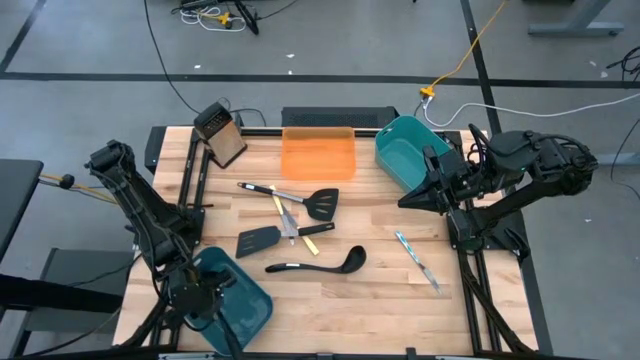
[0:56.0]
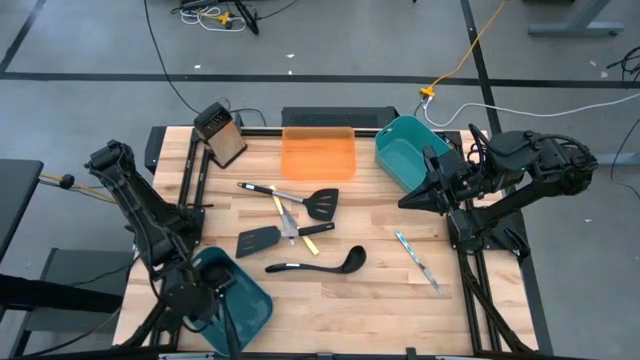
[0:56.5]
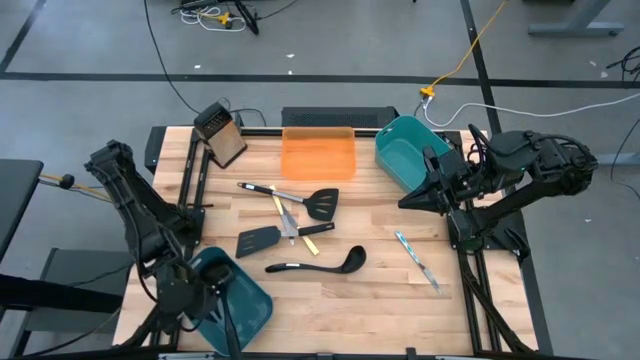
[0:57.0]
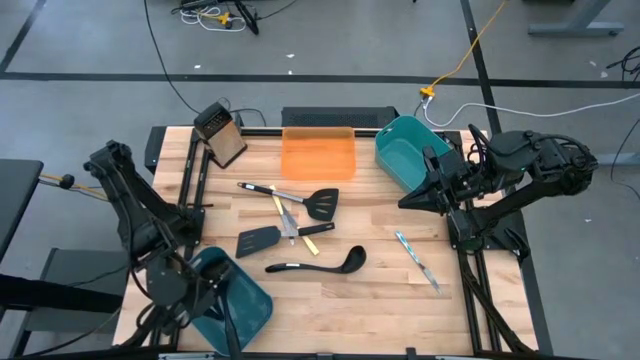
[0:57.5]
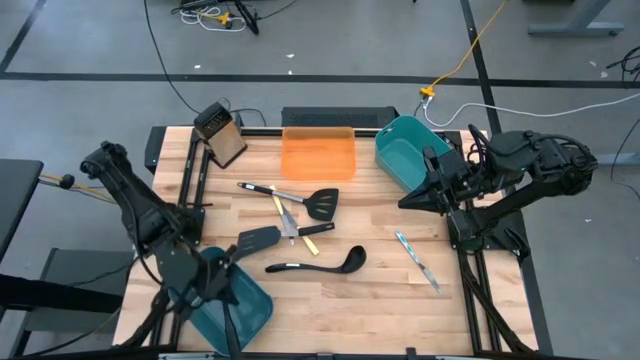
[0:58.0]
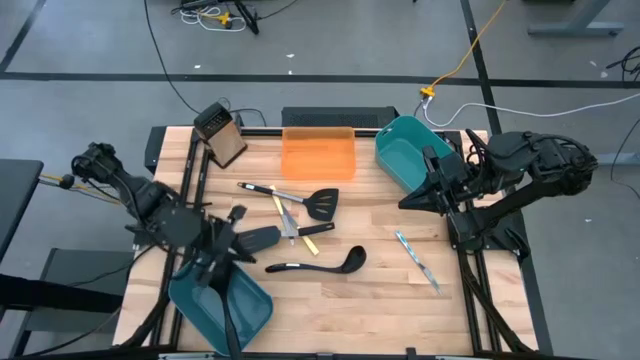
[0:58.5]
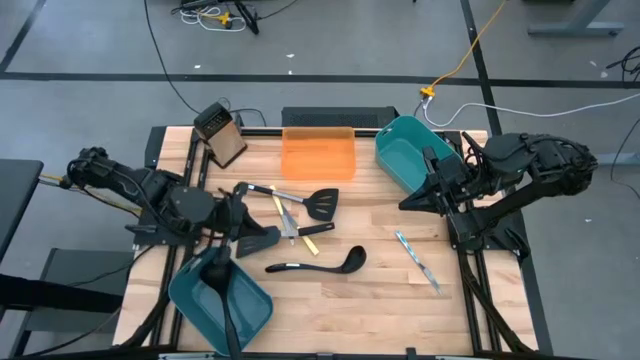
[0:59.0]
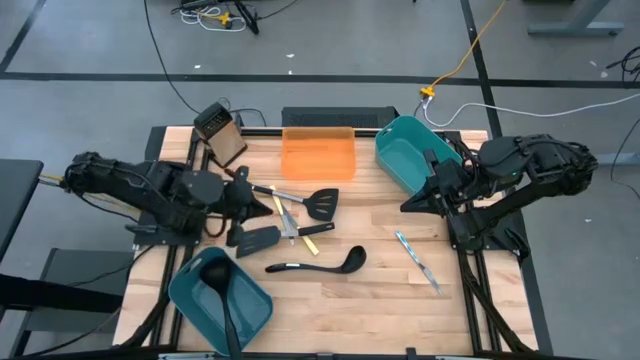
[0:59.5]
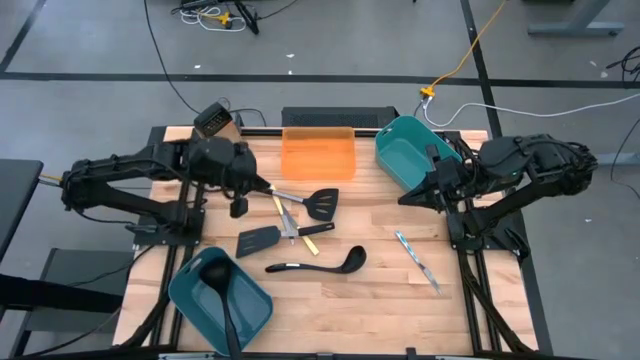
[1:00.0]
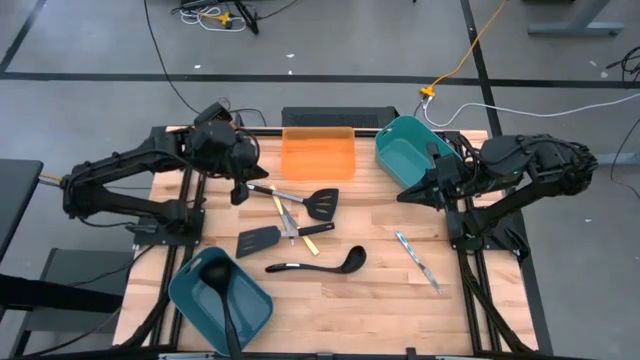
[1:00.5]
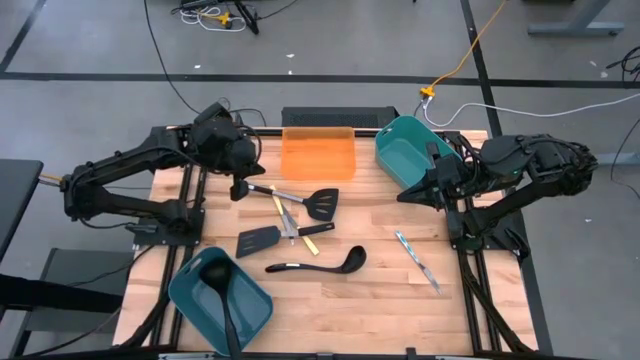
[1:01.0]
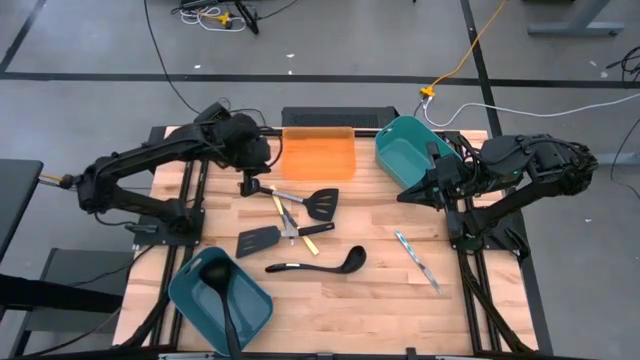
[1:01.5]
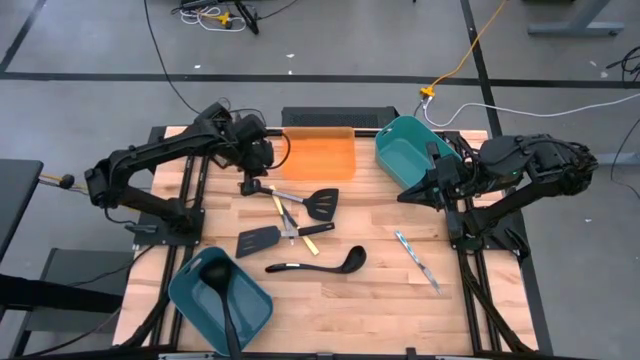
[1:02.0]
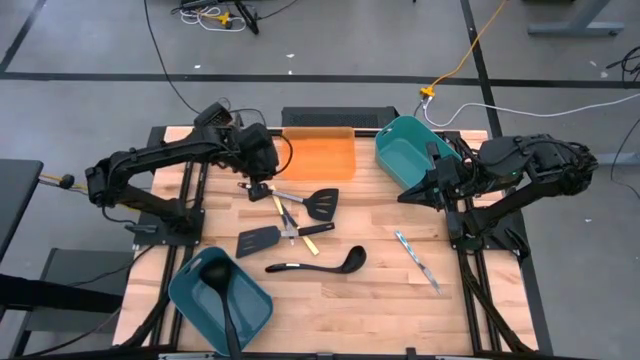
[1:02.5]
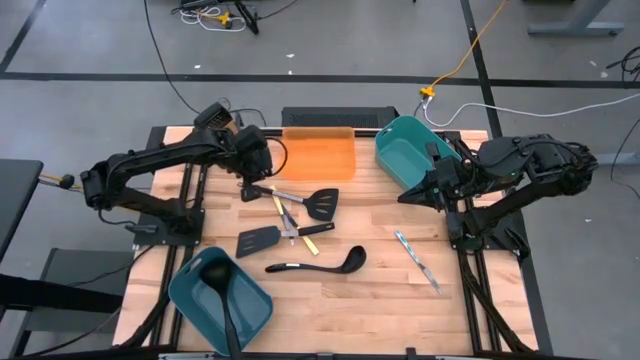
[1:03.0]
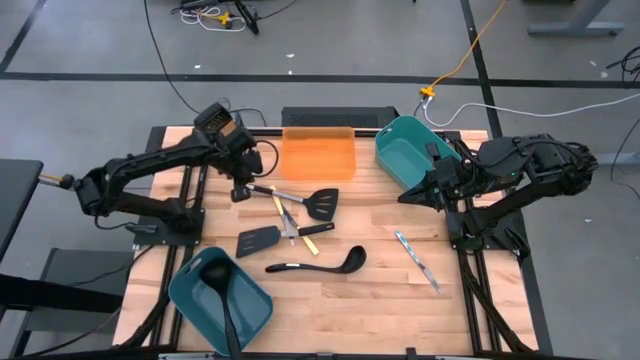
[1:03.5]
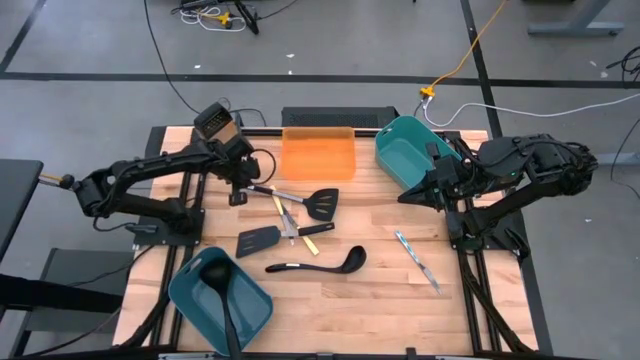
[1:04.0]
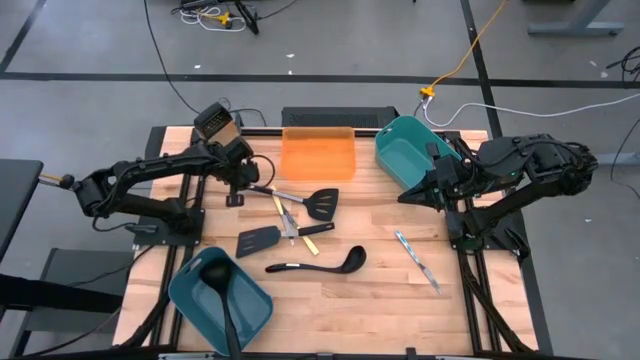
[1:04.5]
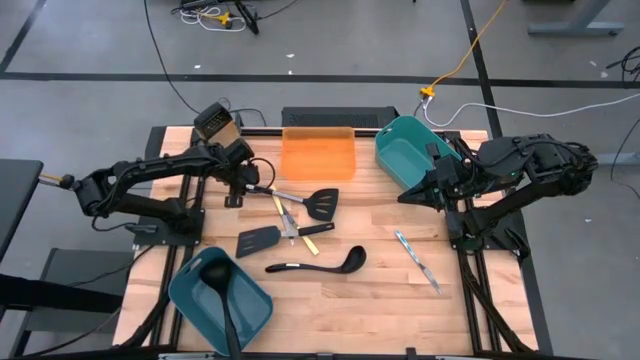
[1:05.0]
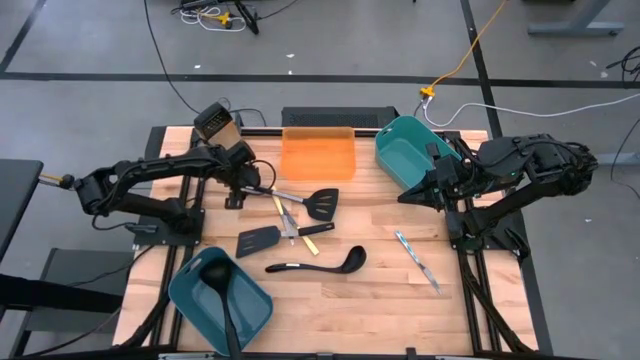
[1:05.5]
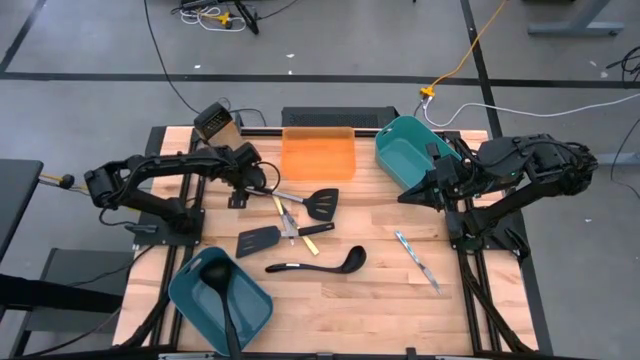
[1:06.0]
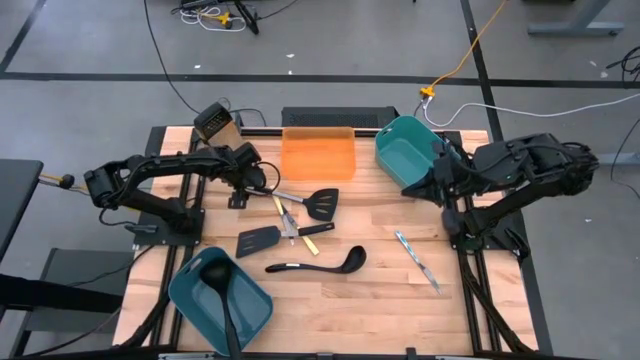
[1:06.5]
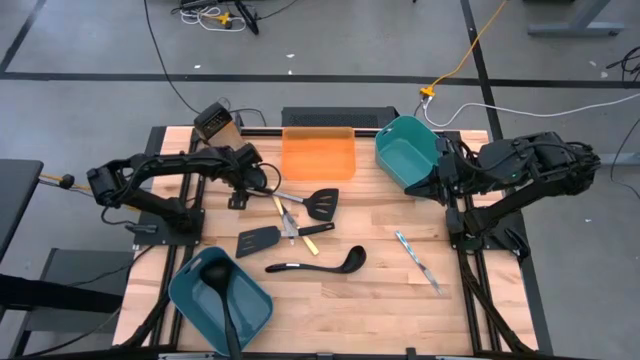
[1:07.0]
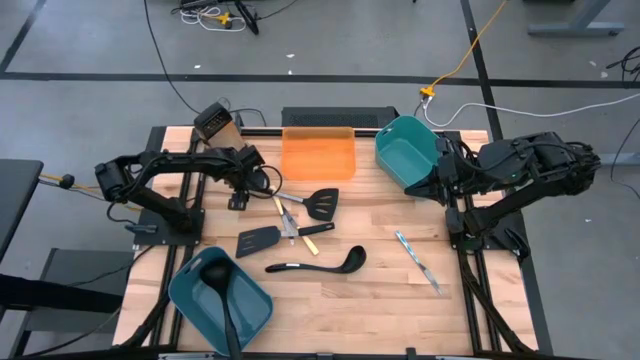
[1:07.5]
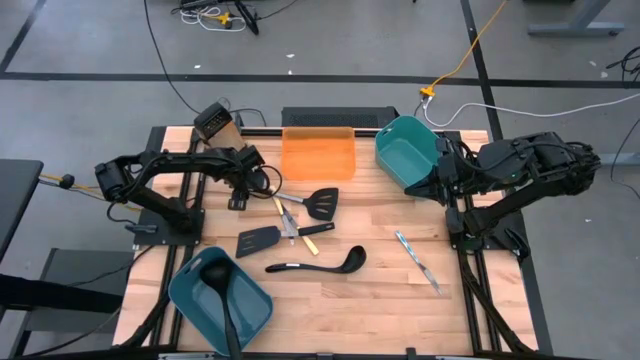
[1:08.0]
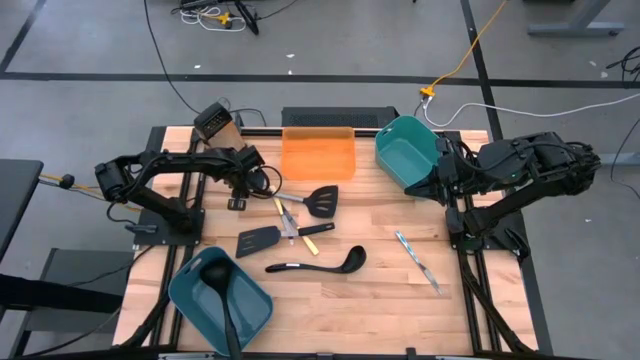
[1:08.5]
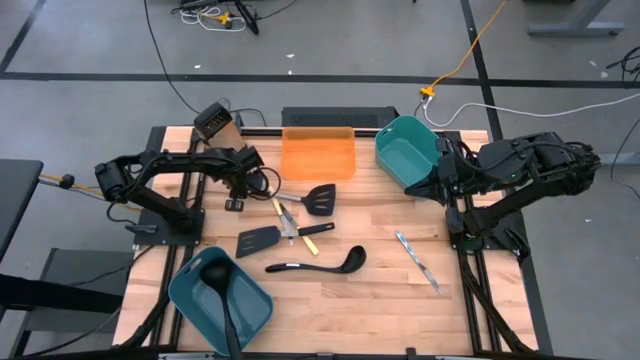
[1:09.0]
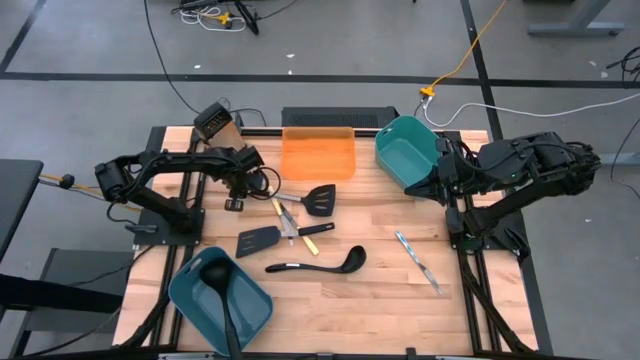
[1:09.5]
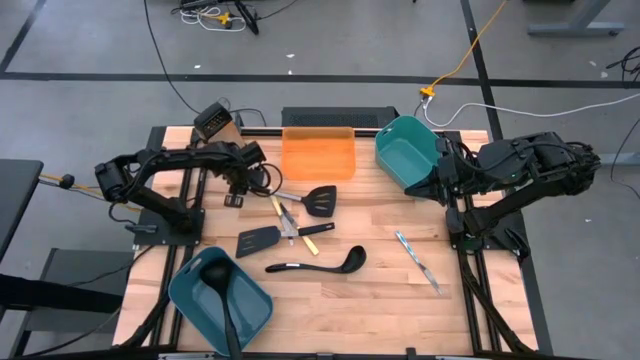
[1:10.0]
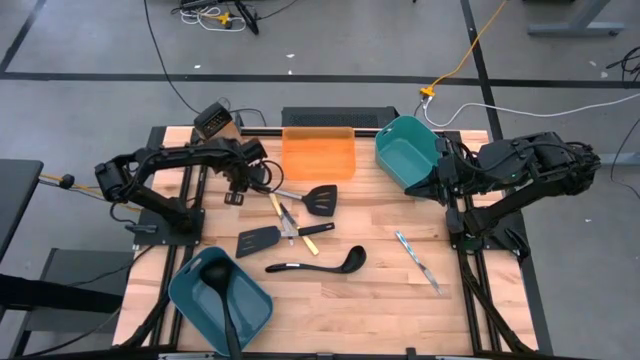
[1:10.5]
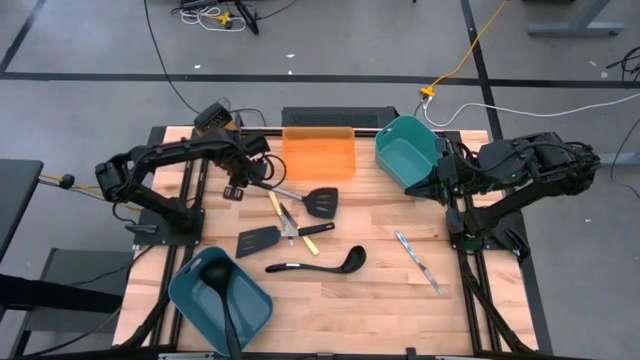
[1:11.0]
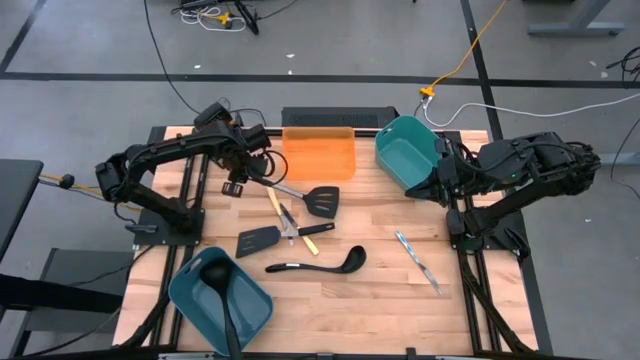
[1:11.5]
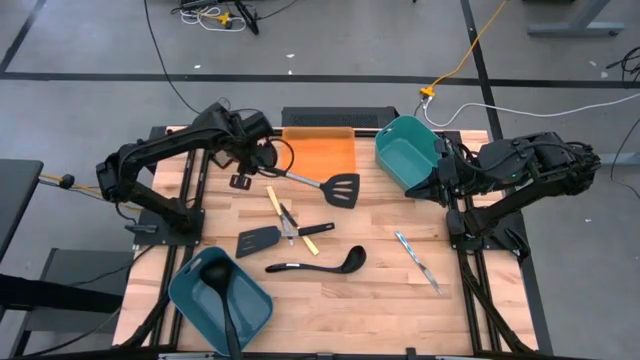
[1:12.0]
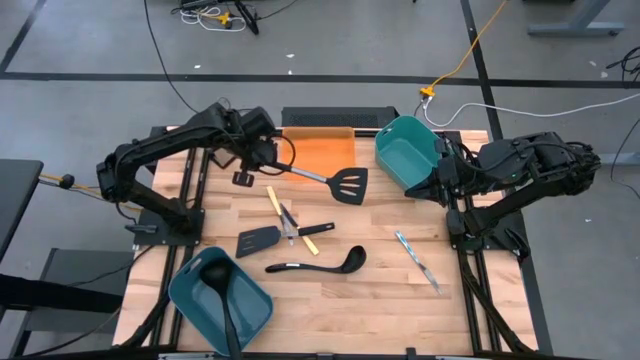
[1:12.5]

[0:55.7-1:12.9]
Task: Pick & Place Kitchen Items
Put the top black spatula into the green bin

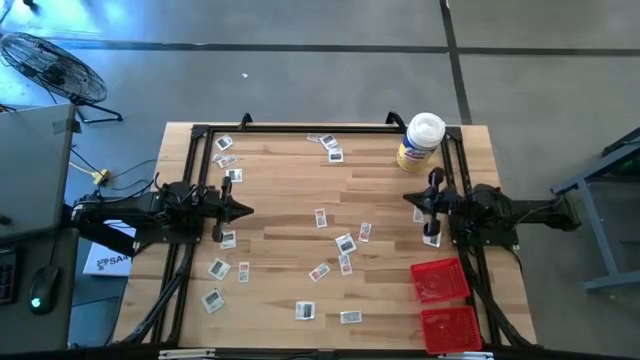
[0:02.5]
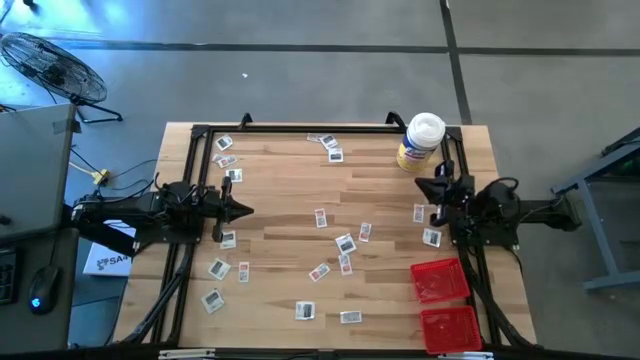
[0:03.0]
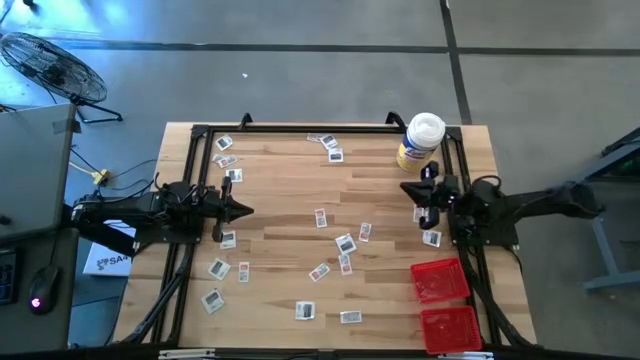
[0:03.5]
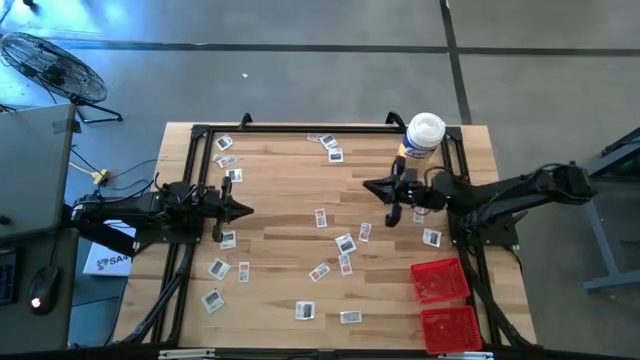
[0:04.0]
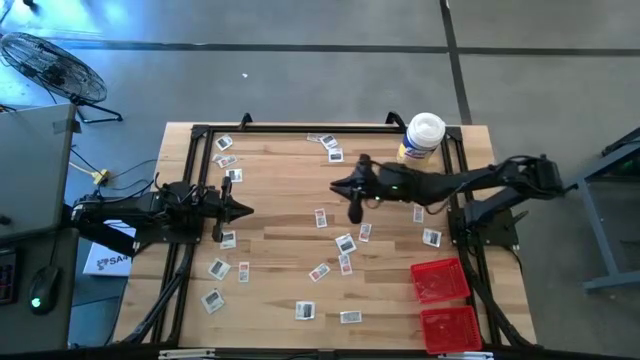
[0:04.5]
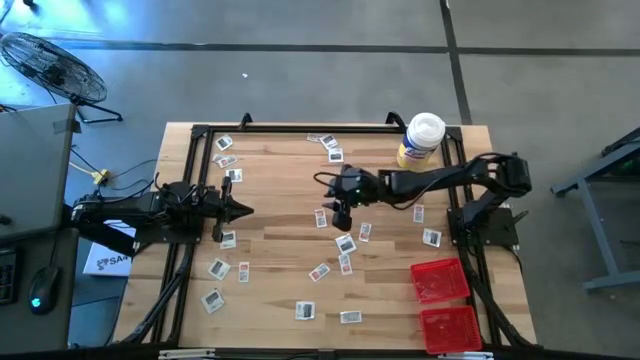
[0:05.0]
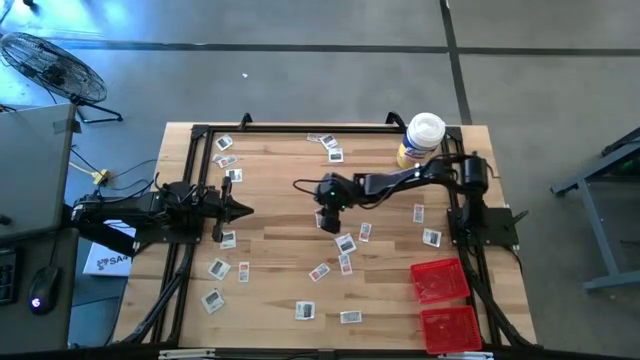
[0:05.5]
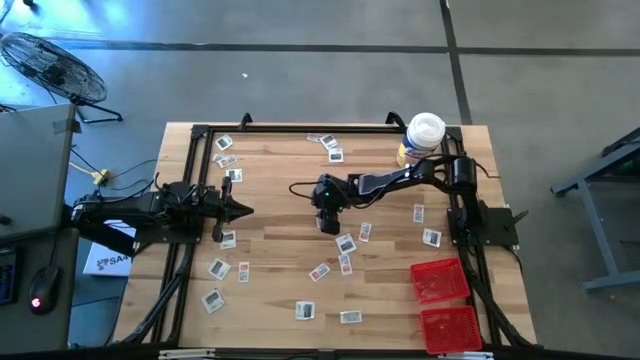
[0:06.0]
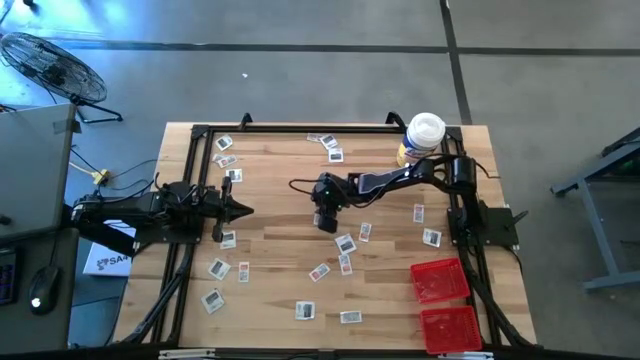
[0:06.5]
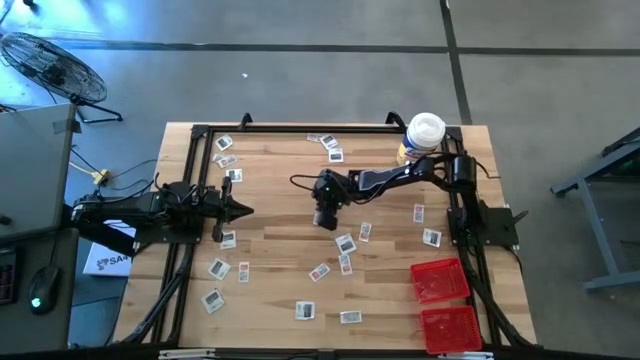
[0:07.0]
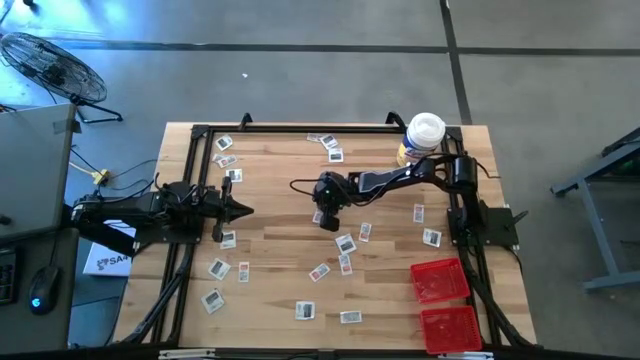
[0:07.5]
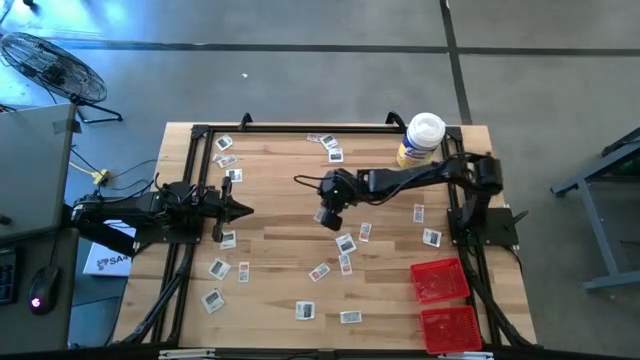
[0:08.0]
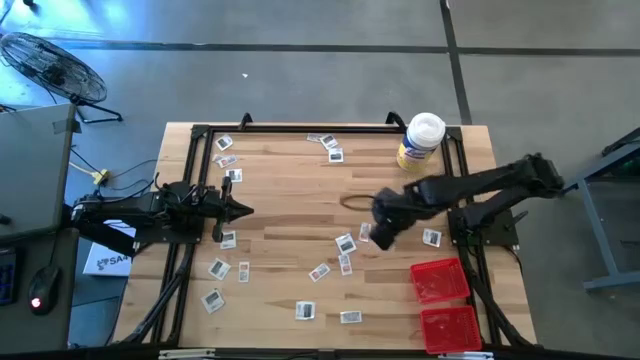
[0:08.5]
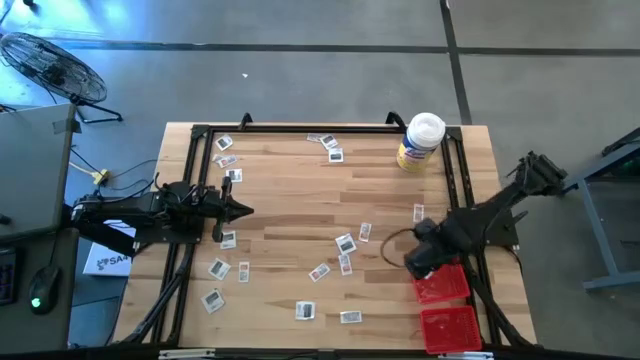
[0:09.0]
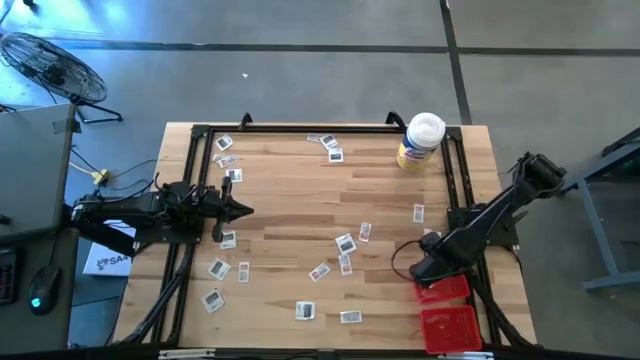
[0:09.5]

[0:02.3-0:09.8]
Task: Pick & Place First Aid Supplies
Put the white ointment pack into the top red bin
